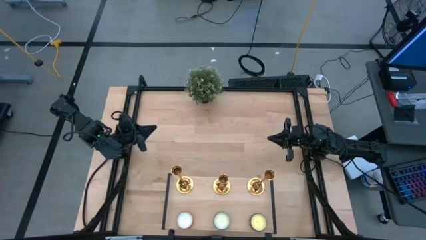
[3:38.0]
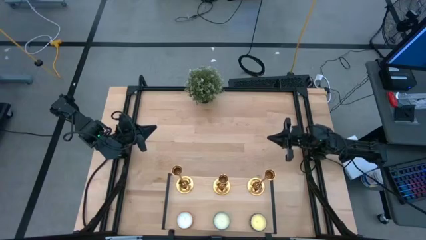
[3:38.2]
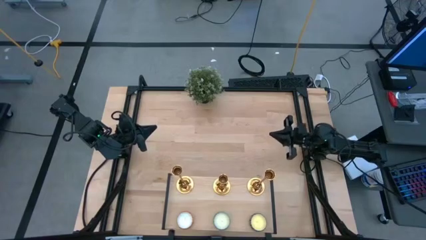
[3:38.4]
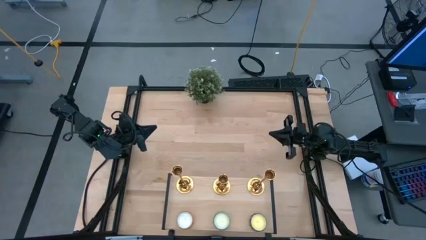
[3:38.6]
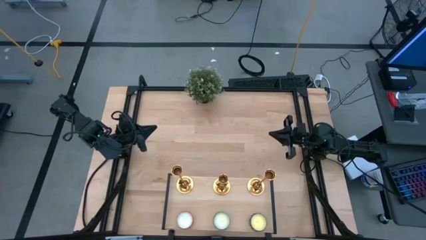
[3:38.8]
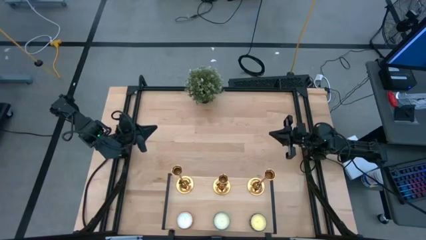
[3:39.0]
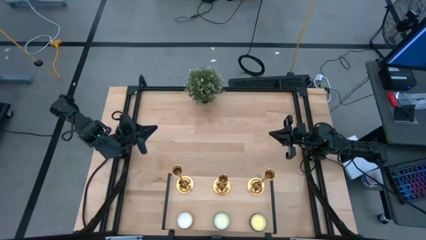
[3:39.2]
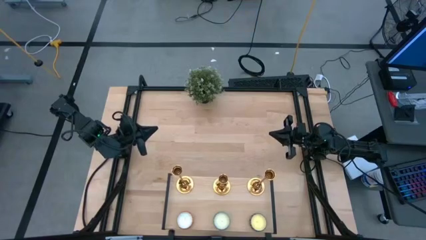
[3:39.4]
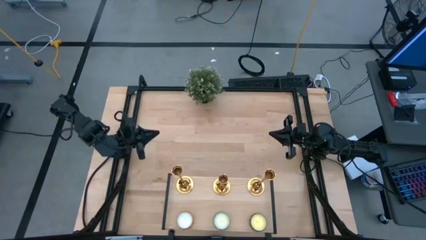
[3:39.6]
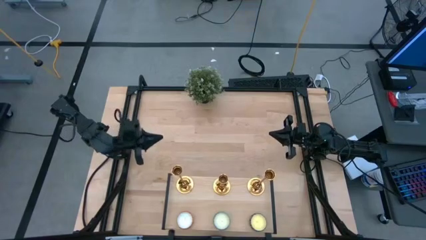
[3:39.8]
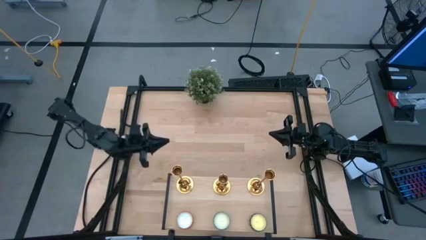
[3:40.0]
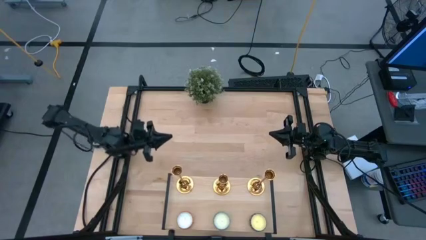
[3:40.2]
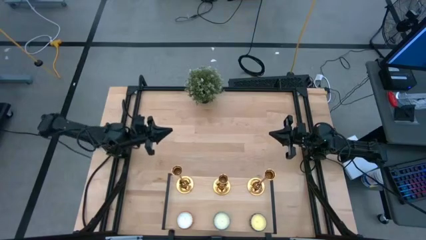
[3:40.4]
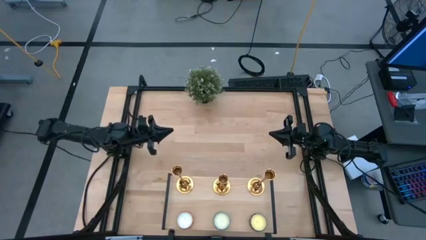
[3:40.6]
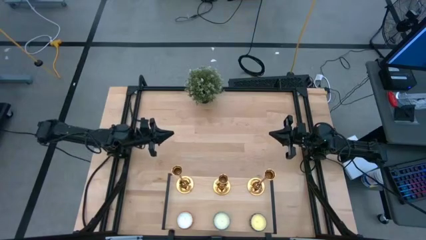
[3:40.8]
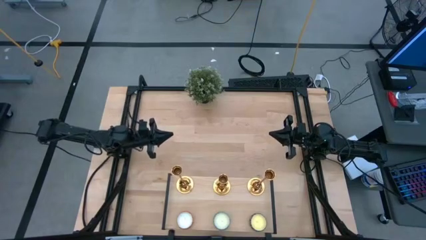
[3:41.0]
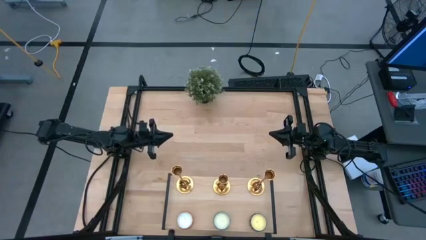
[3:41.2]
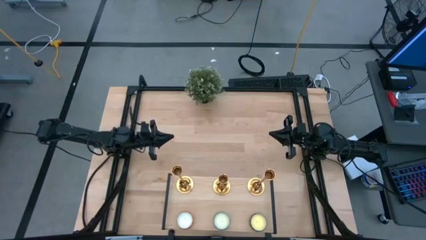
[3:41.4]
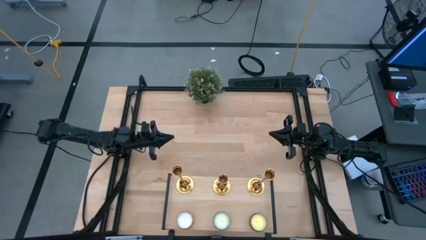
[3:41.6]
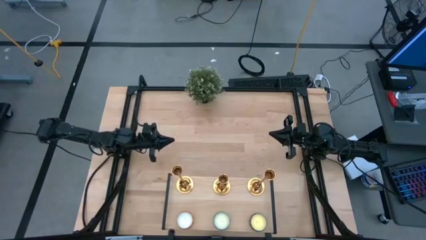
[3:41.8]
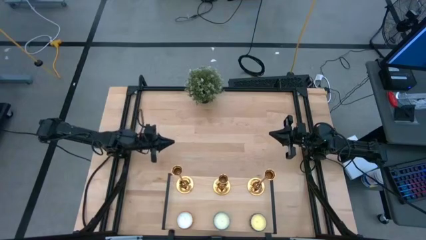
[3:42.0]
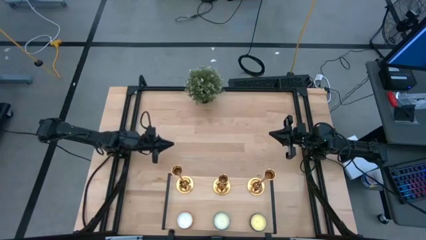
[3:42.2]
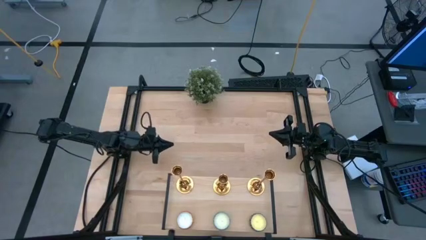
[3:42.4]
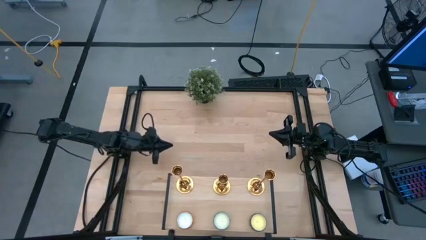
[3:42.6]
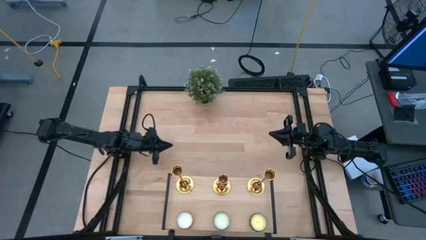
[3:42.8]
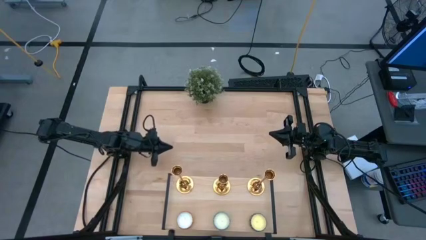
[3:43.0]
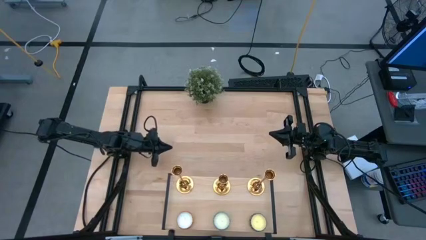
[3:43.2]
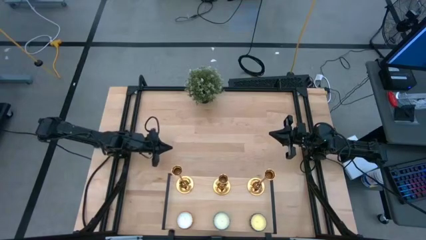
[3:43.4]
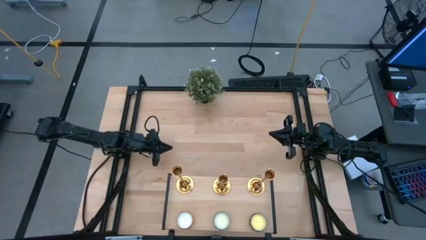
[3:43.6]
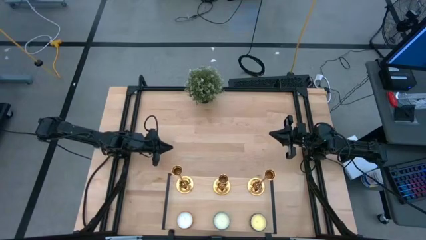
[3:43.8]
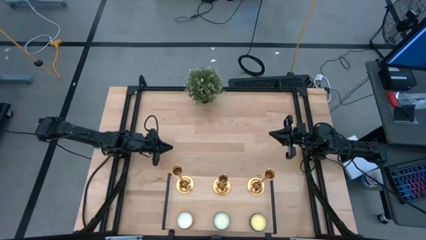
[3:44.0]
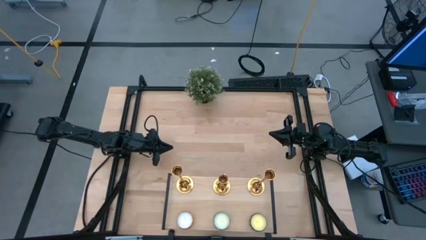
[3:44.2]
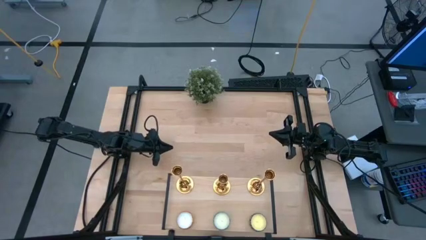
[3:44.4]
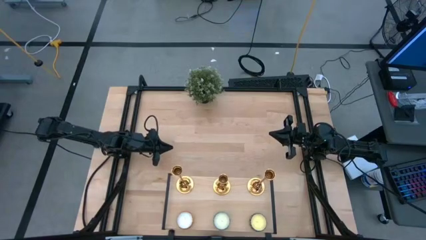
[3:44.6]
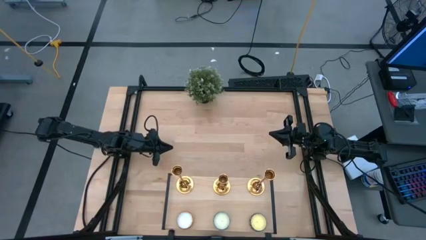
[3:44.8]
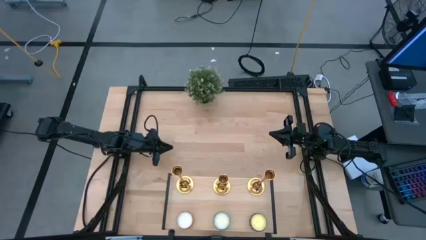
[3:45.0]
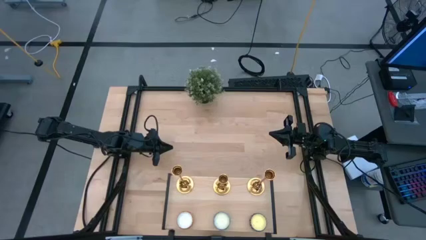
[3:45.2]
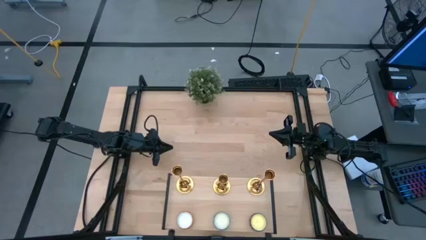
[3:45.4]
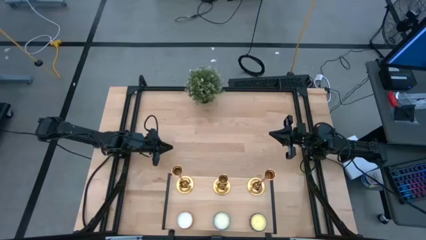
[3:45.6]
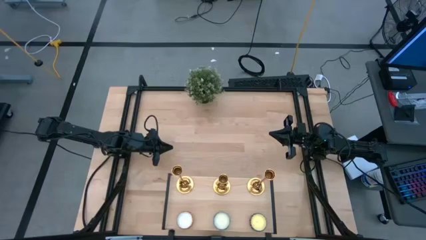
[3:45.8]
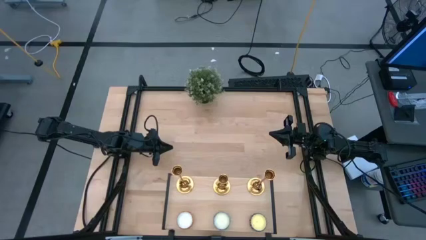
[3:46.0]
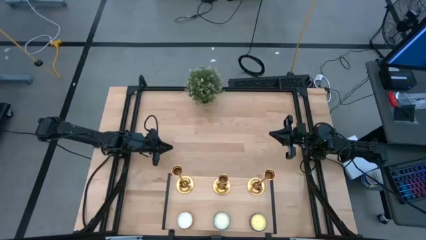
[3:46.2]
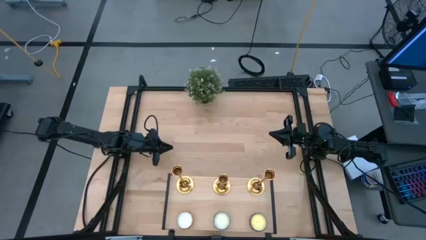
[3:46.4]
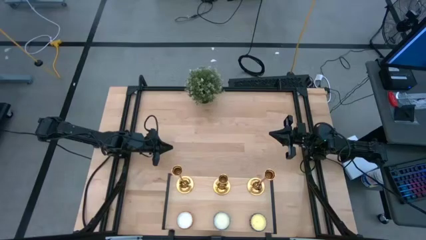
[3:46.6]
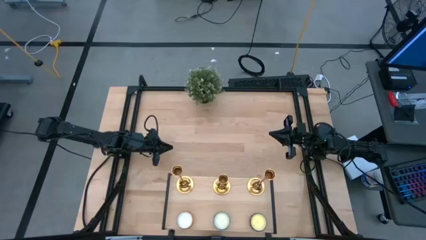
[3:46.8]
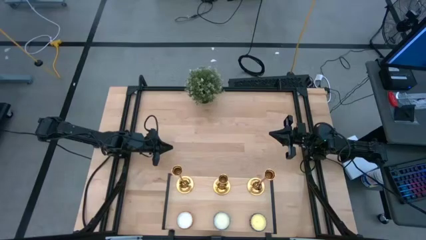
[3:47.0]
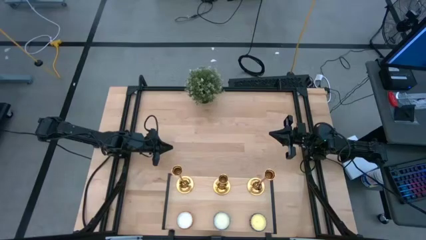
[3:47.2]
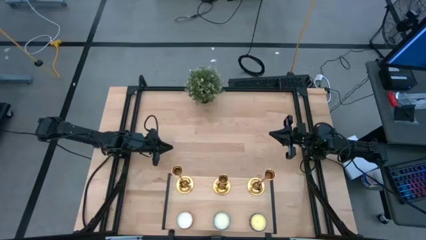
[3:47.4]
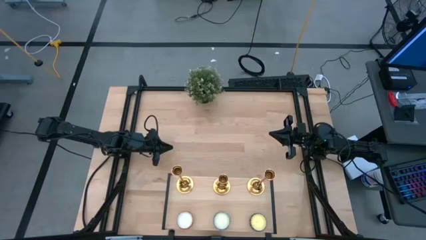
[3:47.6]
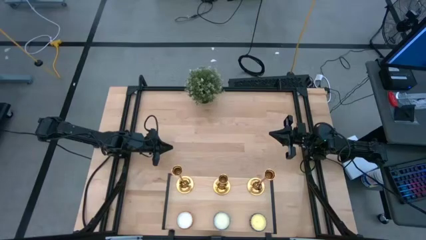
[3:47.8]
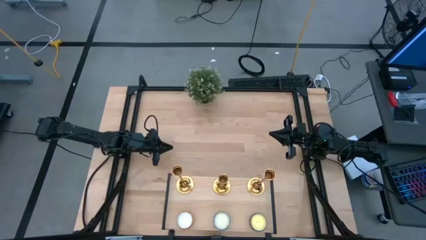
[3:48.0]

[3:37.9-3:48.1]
Task: Pick & Place candle stick holders
Return to Home Position

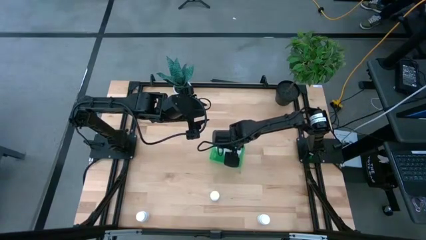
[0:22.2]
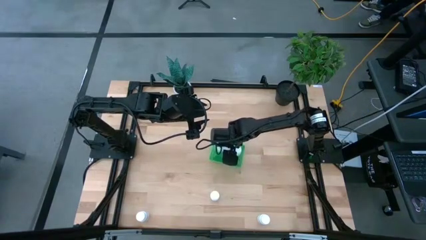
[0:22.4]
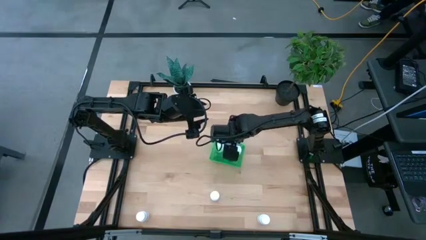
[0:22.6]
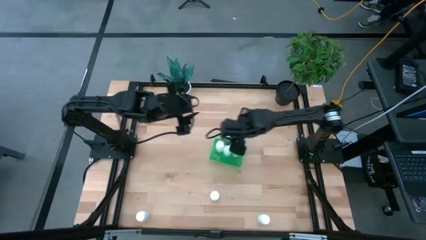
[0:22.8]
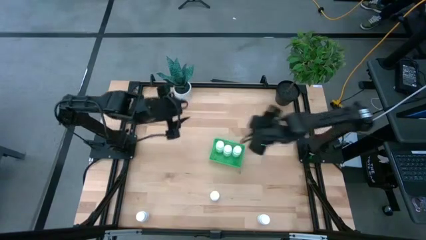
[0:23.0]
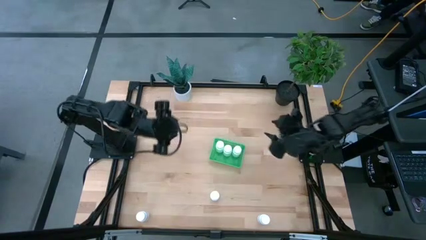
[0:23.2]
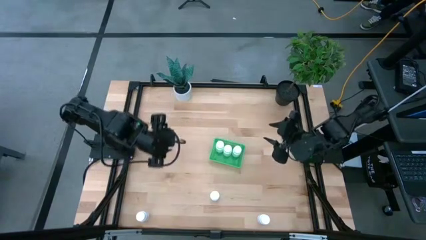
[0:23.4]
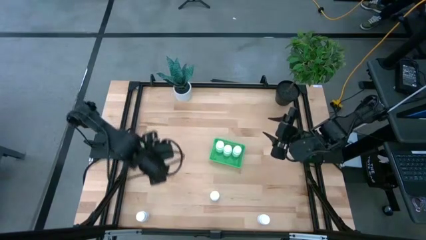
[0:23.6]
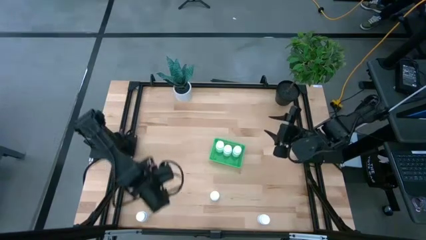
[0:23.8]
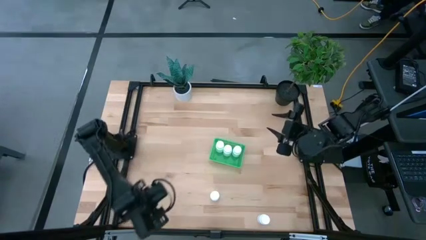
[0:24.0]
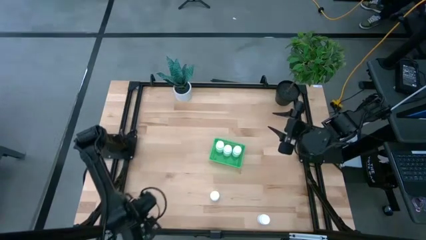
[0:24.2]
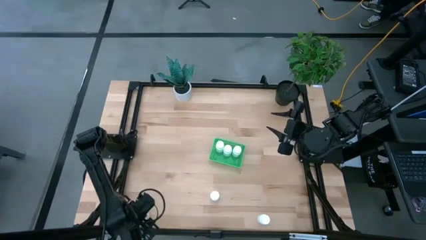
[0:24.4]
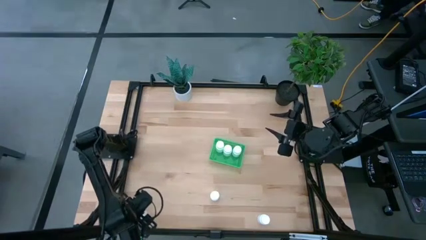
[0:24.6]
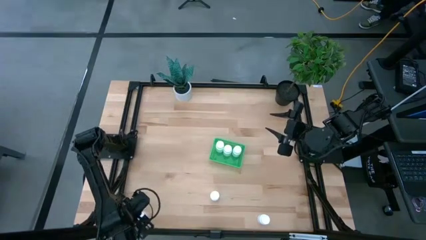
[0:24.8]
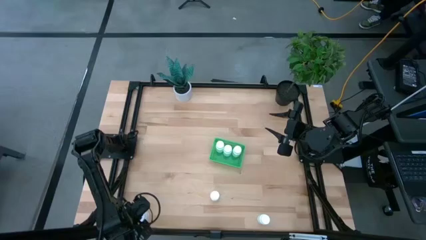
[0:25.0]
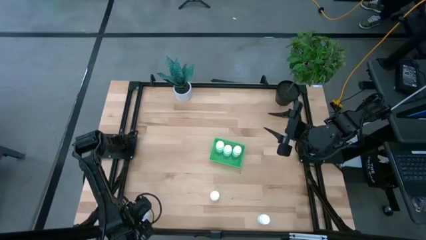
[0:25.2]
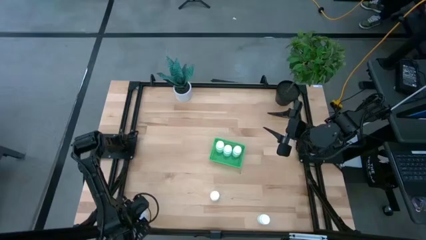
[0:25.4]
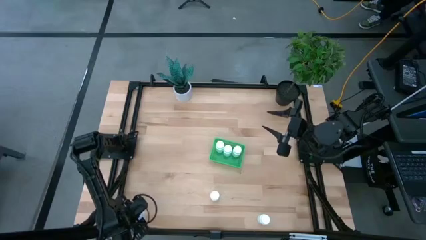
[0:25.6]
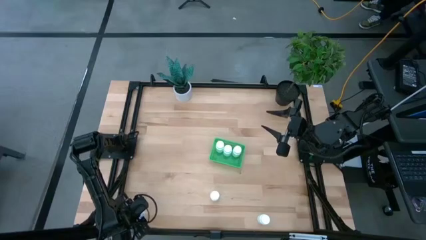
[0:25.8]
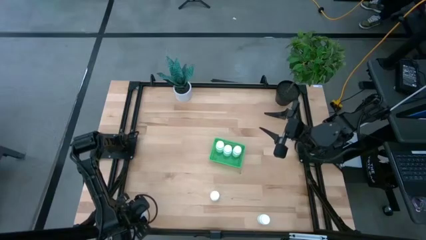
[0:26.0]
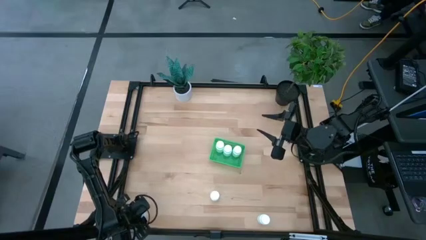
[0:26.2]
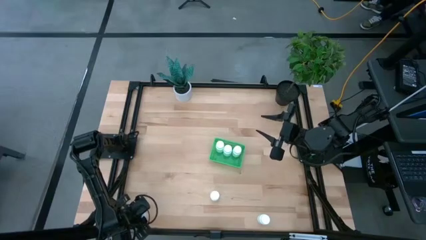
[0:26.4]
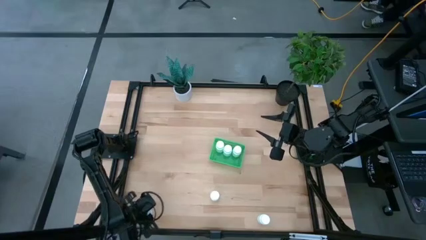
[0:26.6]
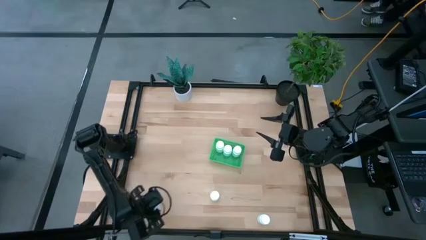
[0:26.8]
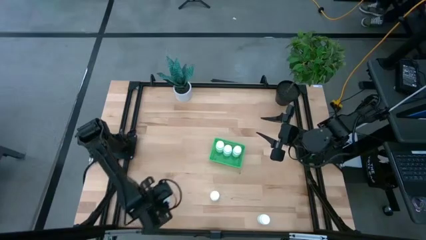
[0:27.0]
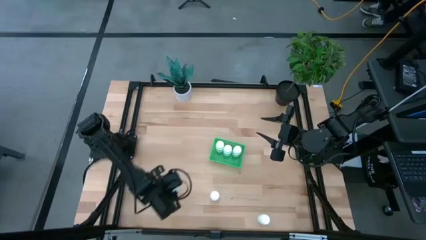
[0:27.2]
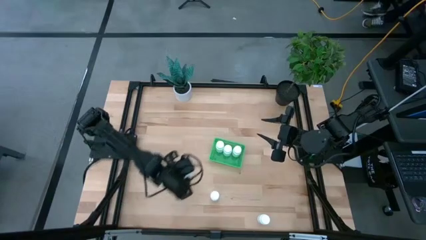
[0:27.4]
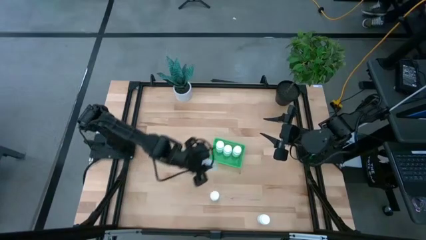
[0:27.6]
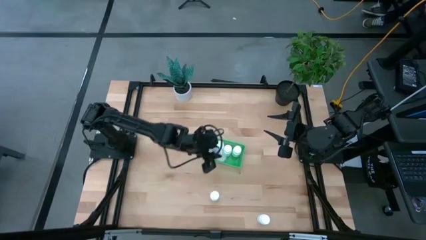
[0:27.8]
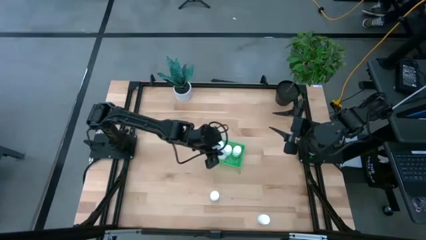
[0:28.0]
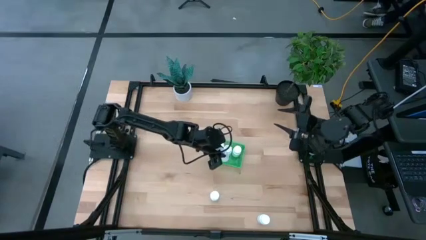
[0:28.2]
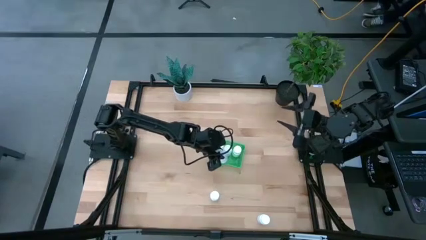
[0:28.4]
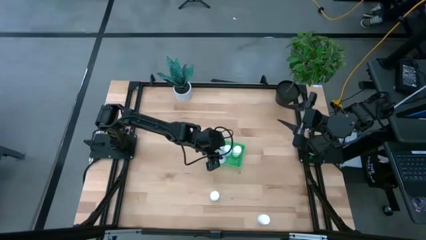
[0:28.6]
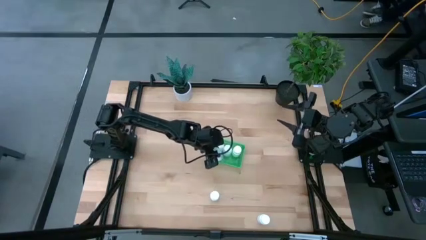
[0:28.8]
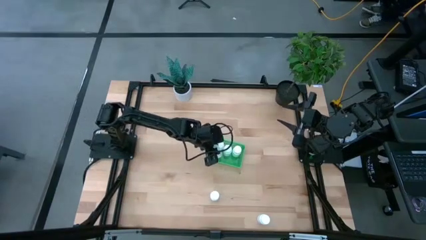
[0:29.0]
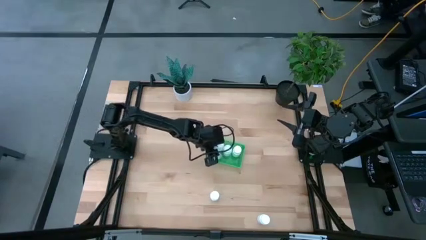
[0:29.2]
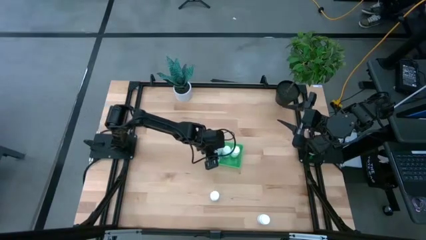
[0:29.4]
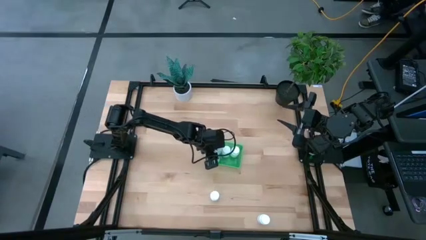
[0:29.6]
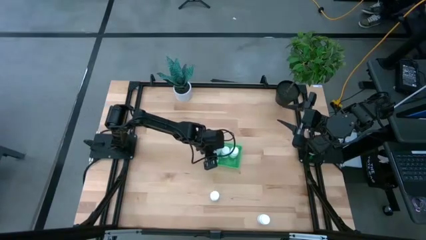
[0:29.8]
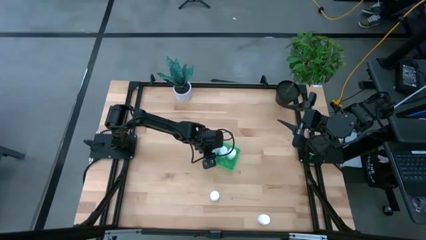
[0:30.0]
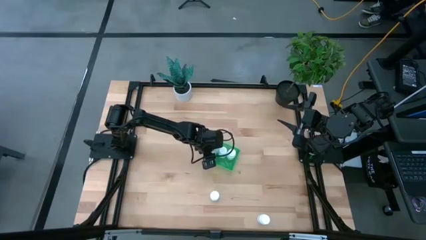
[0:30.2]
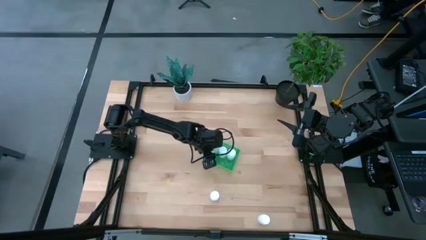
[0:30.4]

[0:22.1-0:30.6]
Task: Pick and place pill bottles into a basket
Put the white pill bottle into the green bin
